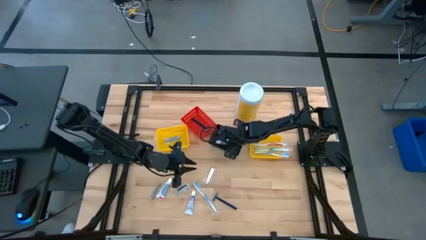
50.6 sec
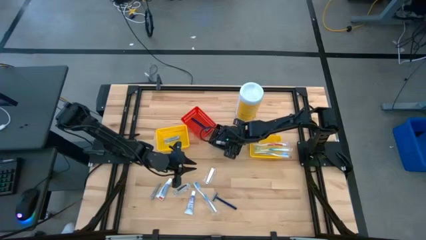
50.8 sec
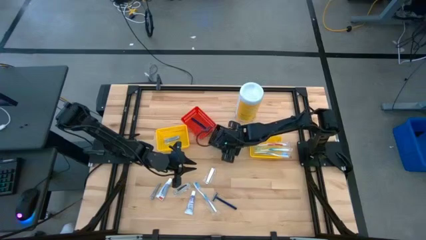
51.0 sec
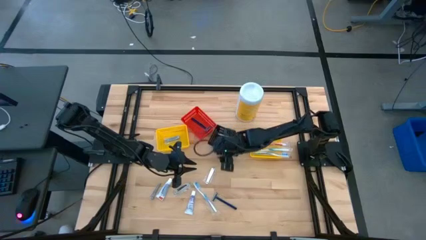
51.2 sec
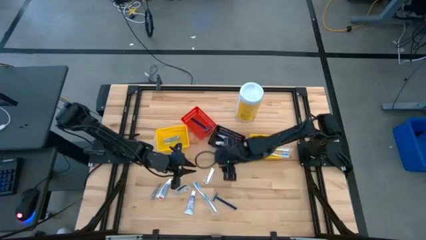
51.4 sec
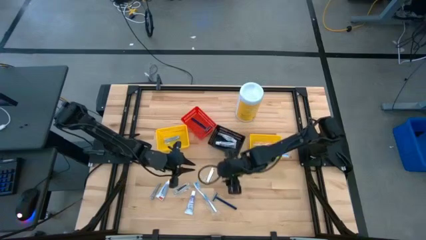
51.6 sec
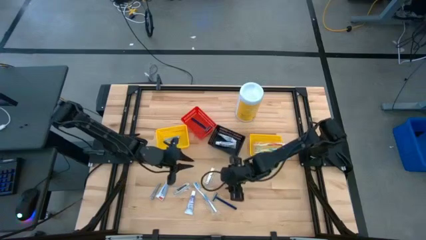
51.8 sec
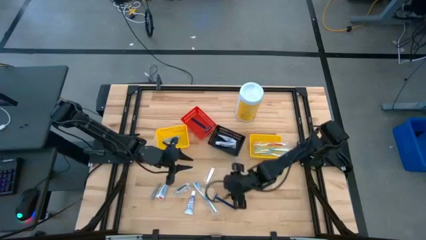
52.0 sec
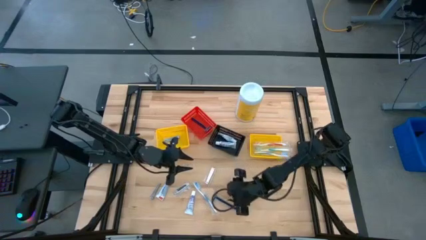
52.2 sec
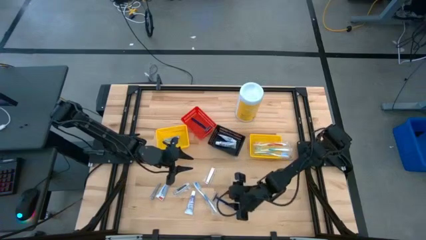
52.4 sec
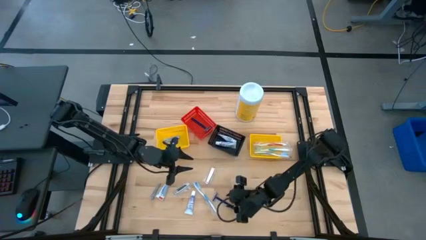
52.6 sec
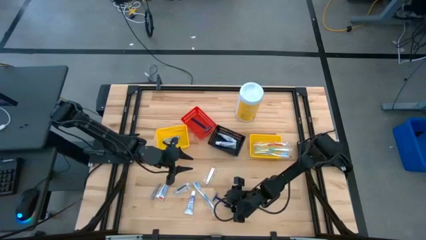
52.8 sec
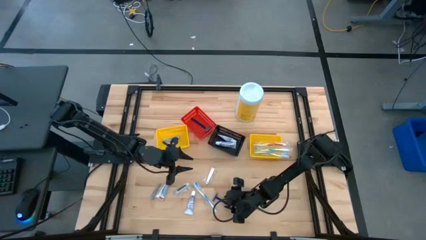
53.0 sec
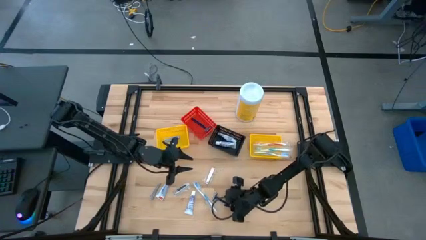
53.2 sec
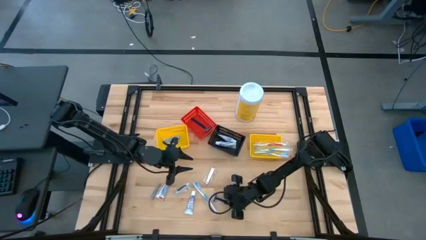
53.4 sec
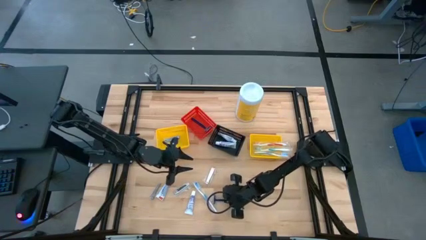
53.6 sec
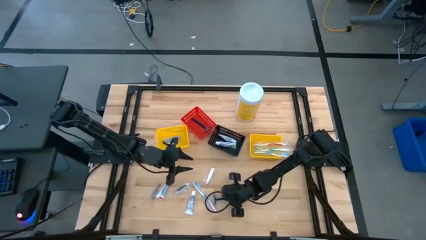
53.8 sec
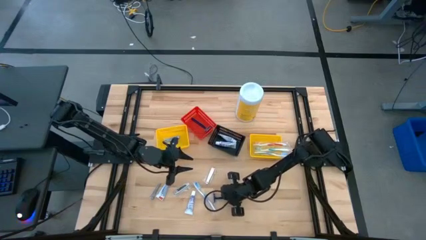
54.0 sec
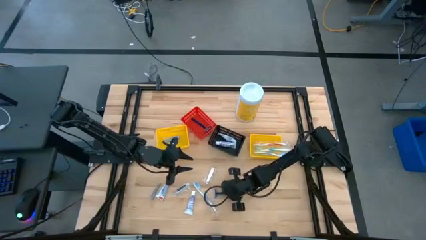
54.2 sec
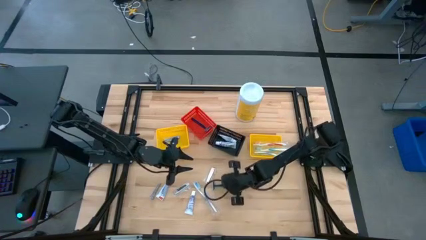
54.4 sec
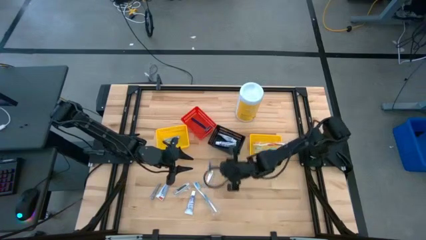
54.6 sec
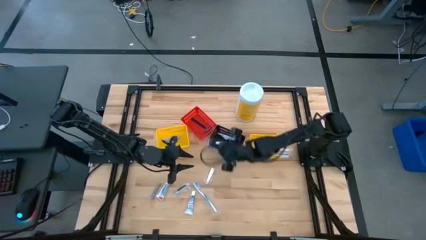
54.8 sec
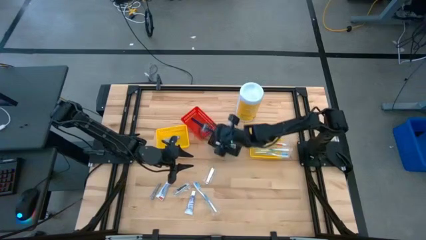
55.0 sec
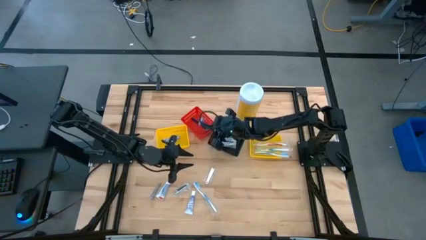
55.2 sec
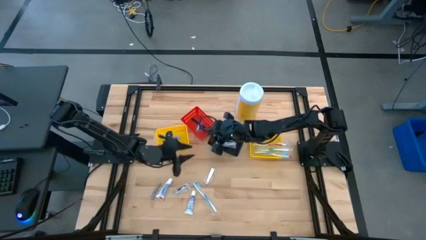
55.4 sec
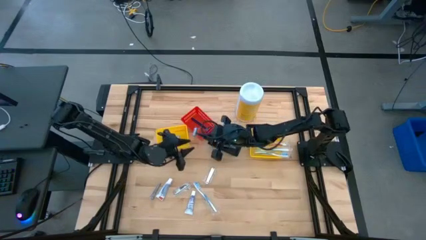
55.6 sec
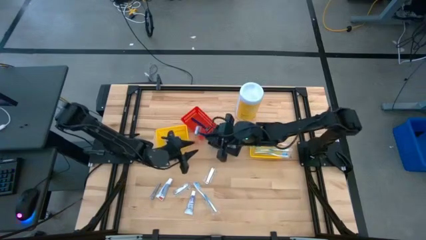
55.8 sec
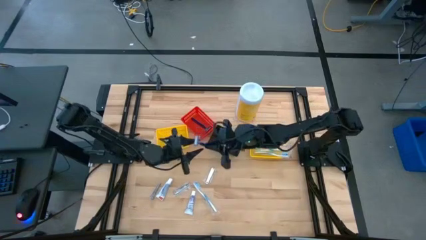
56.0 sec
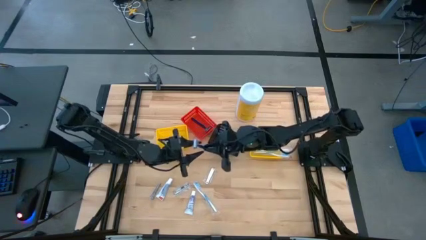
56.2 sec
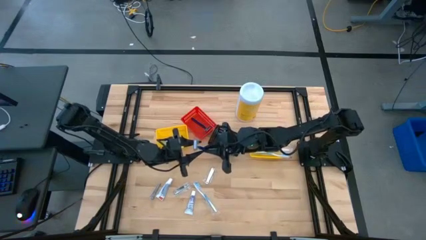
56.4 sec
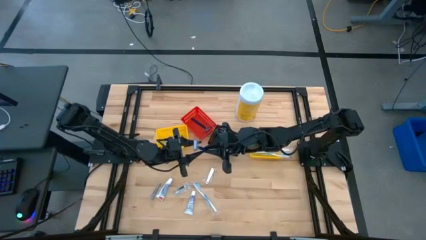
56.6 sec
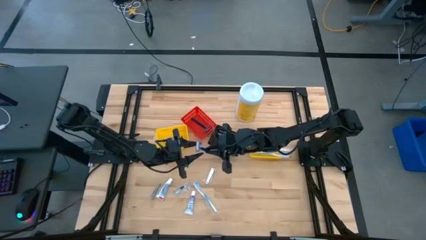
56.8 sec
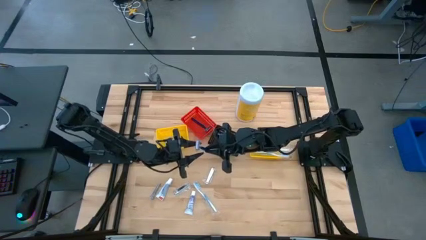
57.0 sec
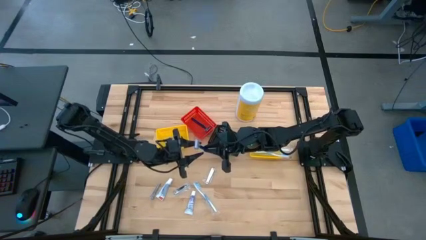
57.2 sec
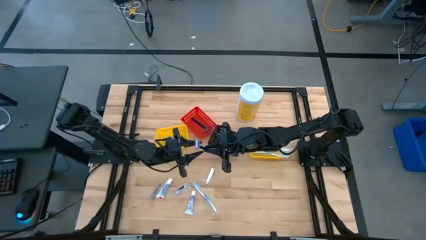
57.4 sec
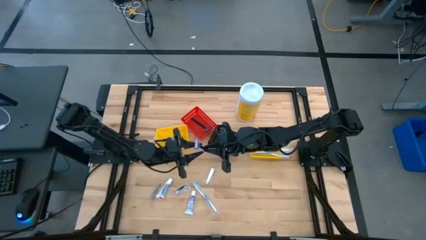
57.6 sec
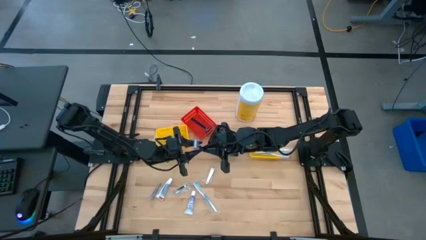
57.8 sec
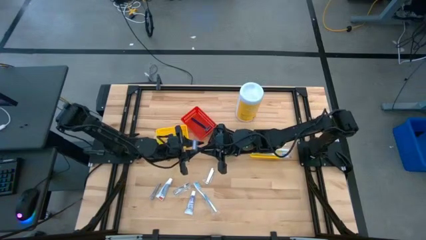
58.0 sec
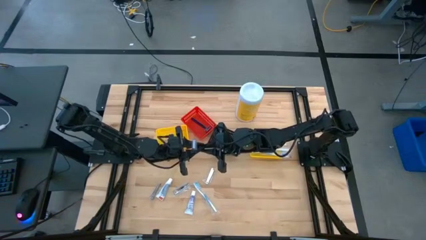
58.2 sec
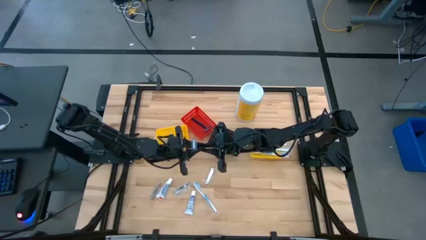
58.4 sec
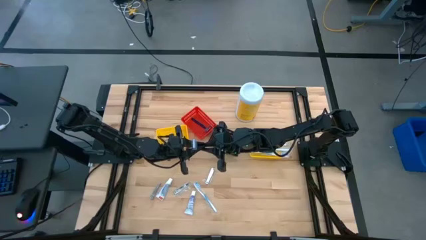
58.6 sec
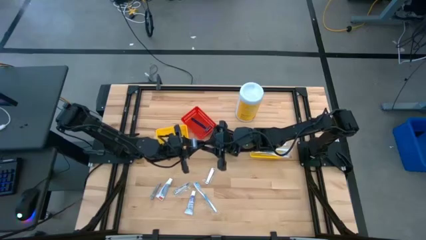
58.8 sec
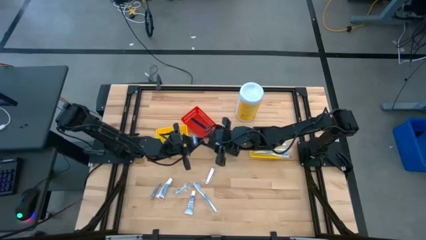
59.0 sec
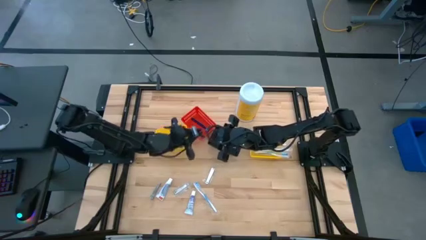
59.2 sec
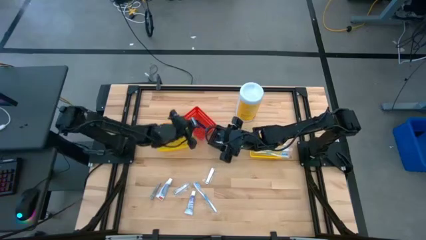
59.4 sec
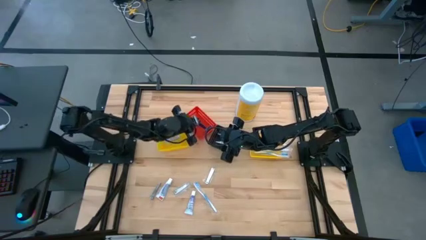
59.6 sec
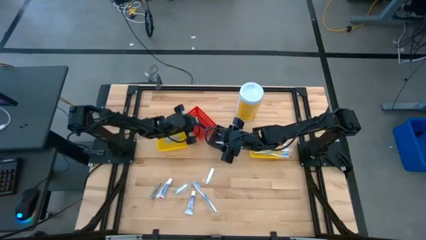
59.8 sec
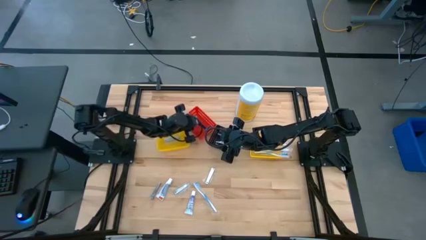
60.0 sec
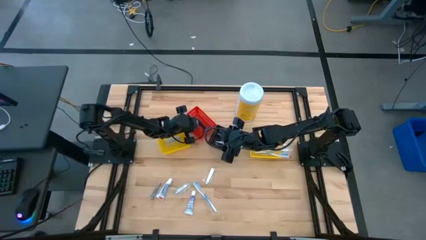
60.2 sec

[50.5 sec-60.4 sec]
Task: Pick & Place Travel size toiletries
Put the razor into the red bin

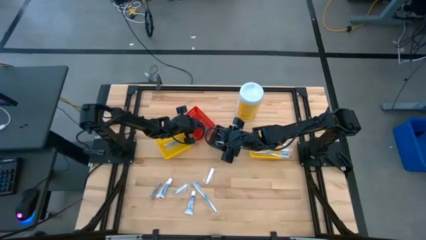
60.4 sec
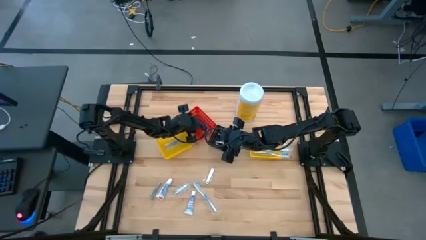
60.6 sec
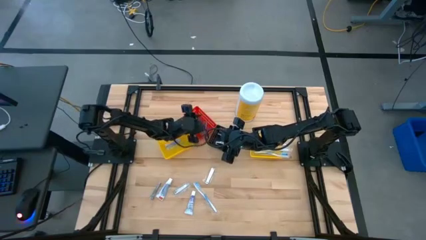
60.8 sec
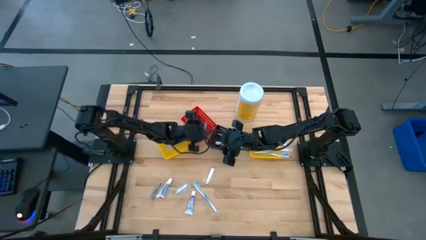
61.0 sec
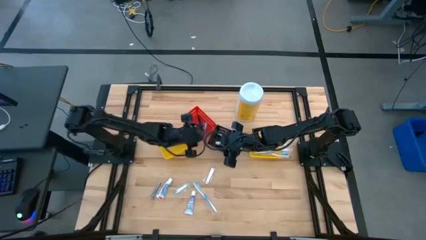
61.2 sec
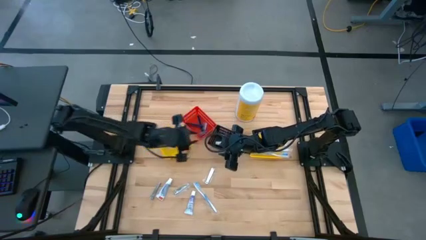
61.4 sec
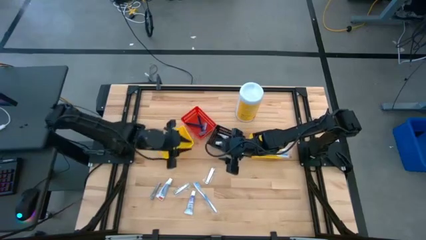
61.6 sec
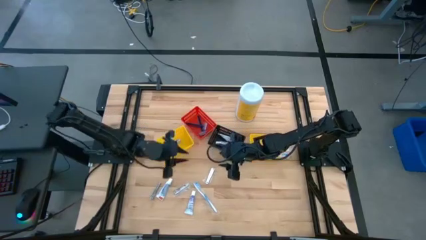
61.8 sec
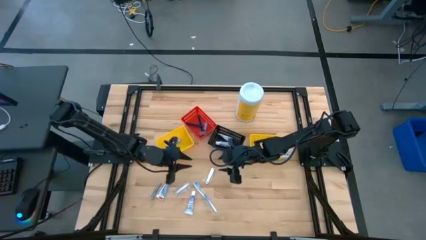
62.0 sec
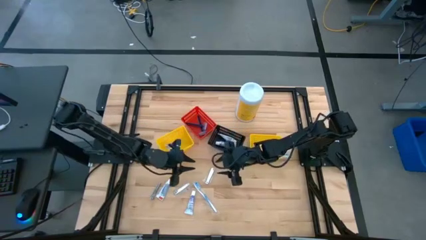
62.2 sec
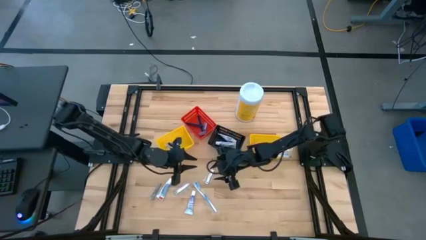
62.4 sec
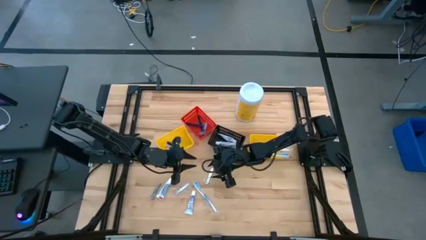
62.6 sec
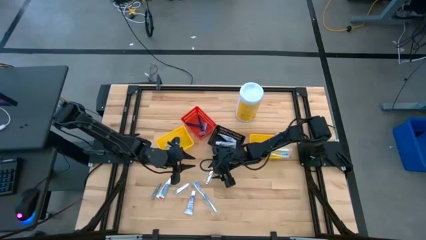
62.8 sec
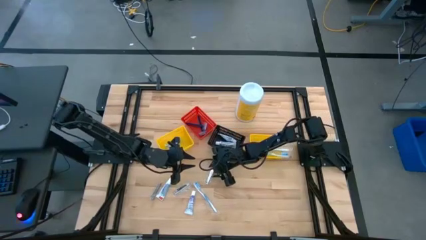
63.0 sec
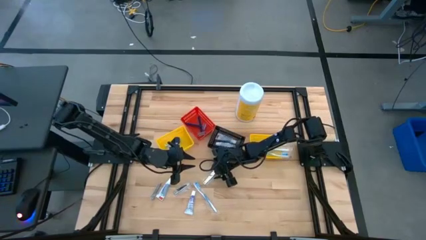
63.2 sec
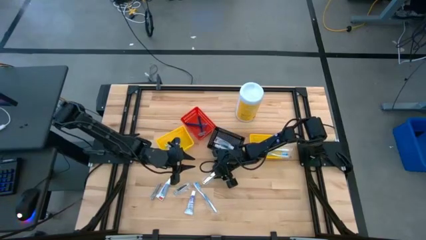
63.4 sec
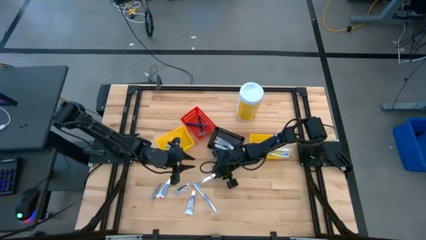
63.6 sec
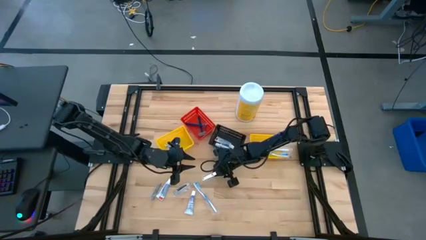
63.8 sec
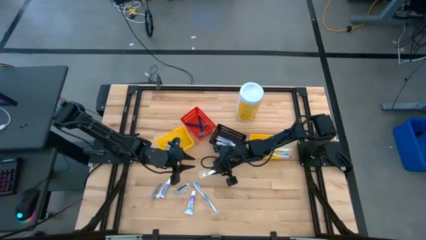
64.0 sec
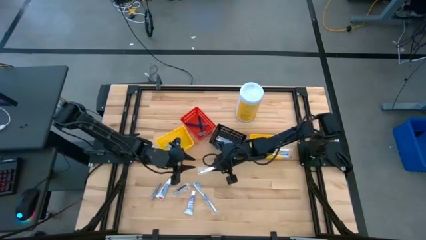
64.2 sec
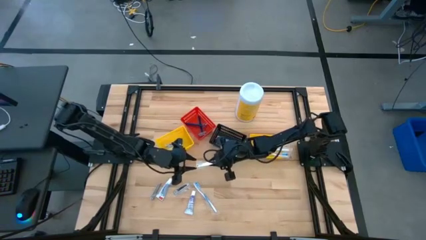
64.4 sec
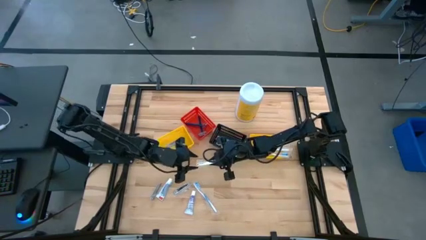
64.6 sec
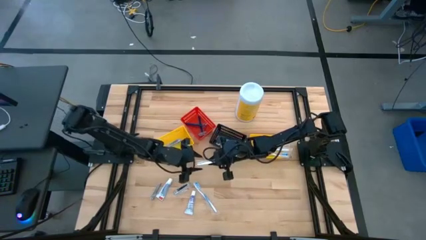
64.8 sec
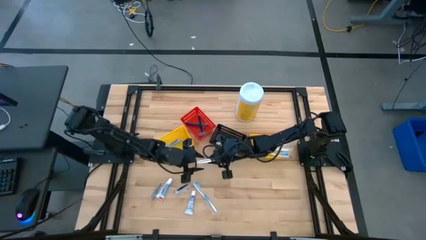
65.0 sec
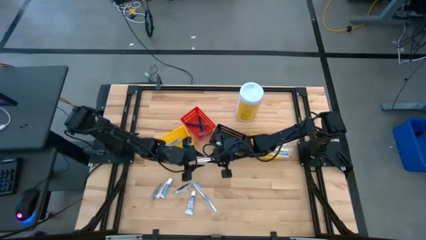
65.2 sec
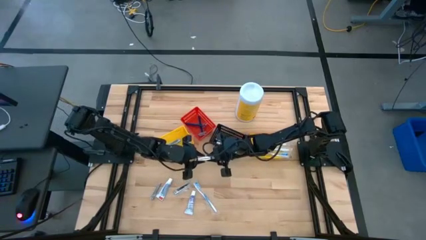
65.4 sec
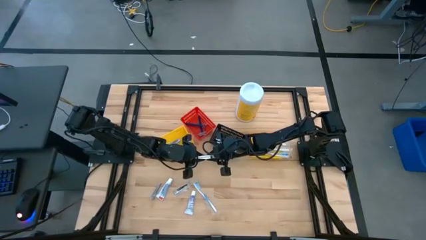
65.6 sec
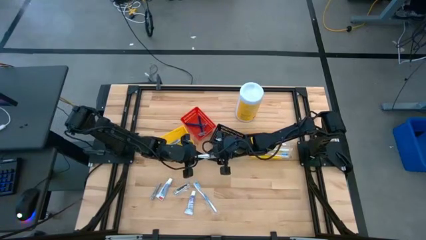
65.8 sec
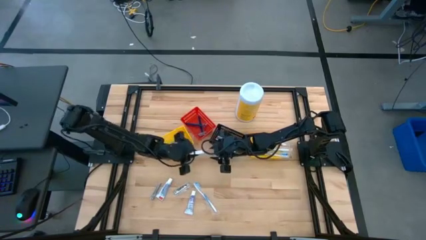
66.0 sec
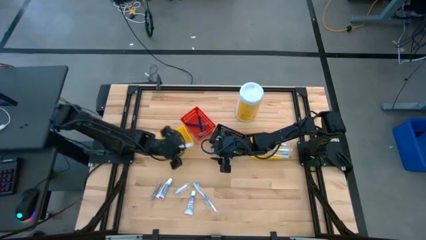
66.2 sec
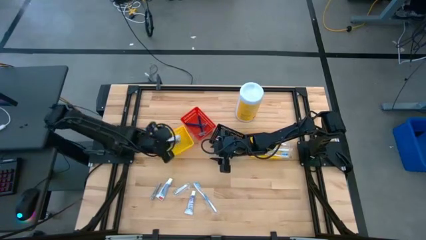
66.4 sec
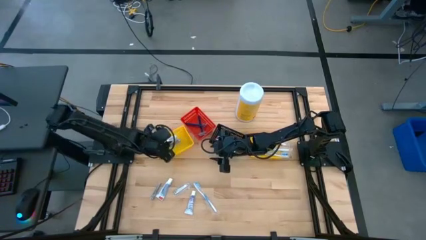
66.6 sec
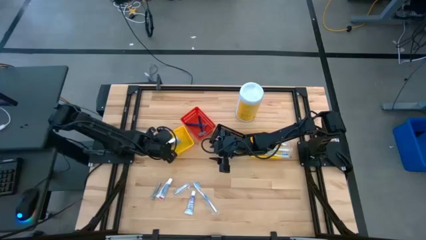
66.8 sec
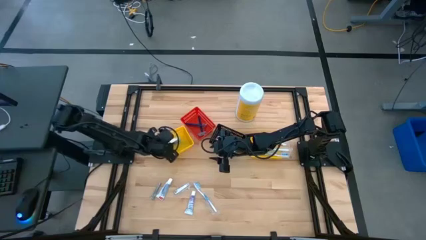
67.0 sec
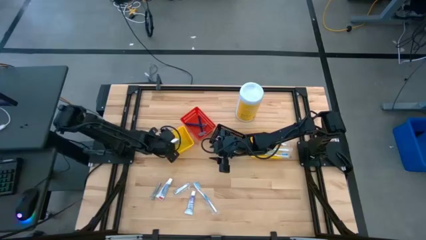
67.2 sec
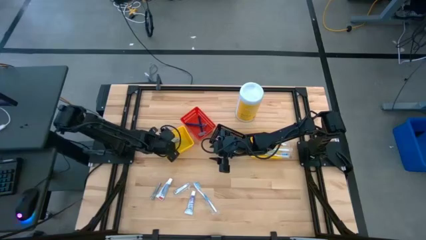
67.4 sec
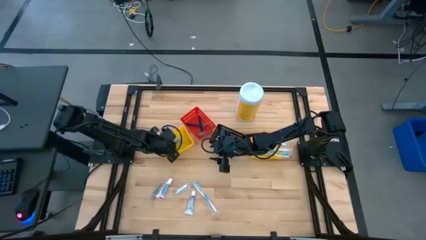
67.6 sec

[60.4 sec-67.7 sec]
Put the nail cutter into the left yellow bin
